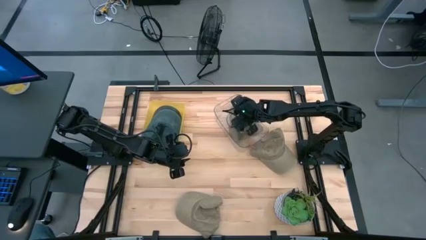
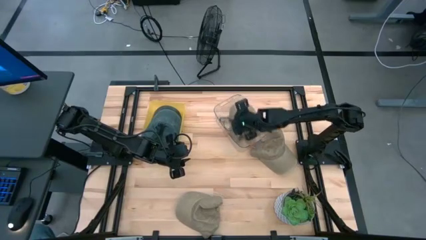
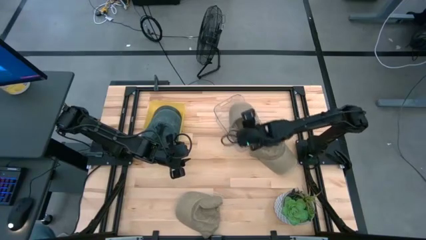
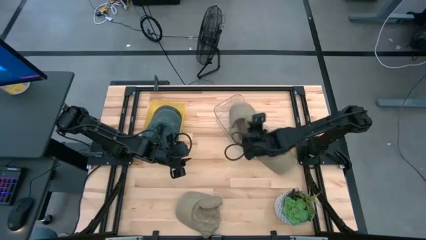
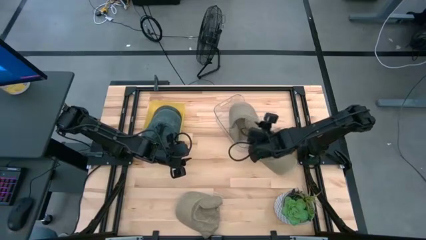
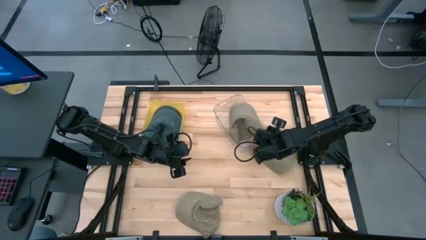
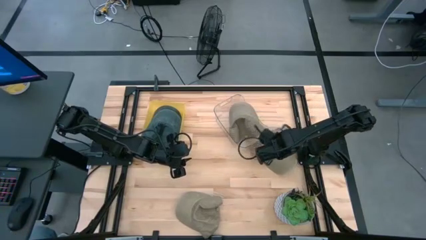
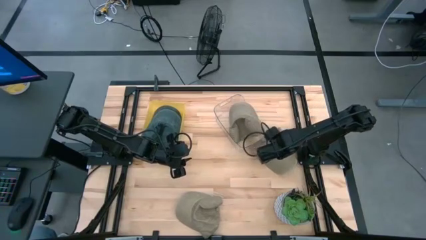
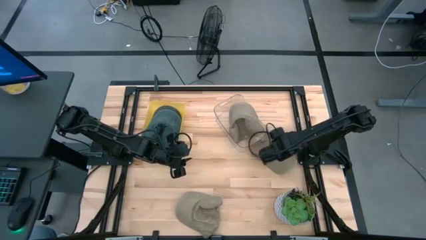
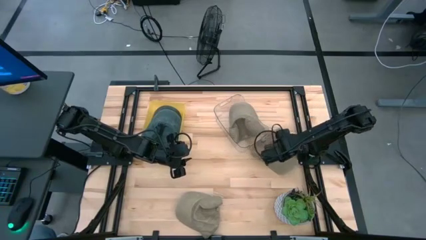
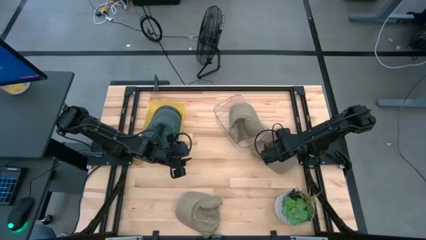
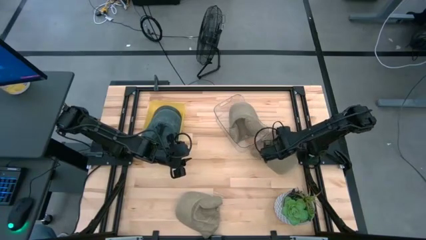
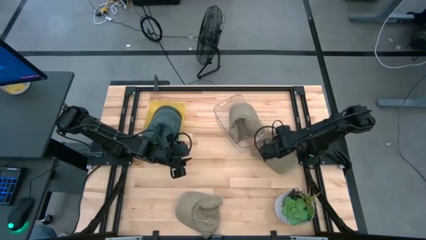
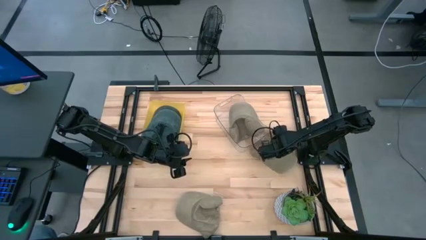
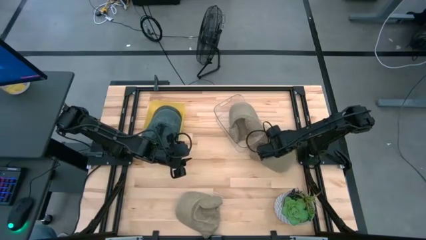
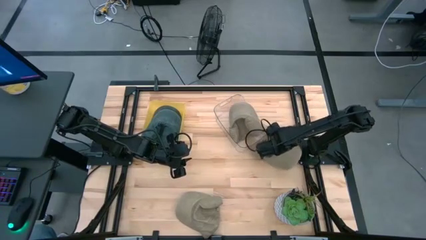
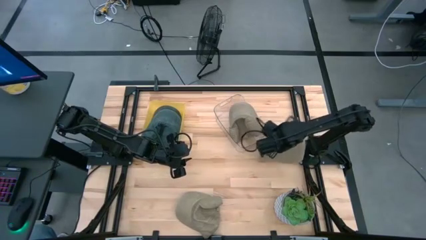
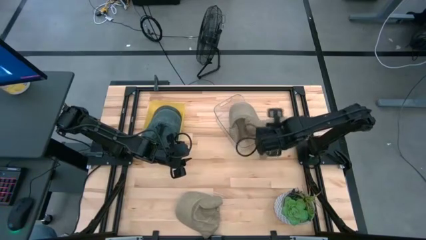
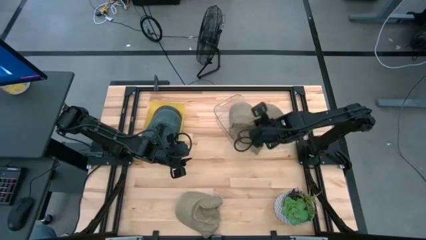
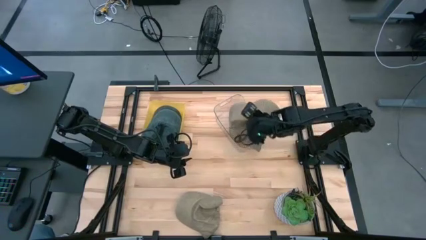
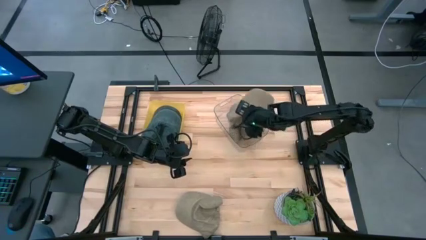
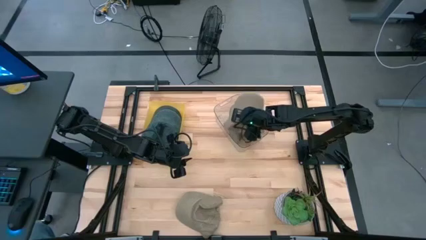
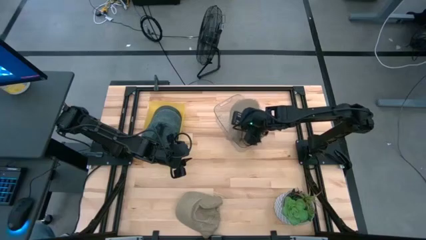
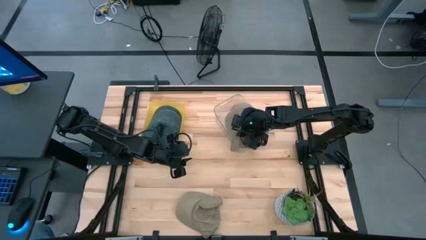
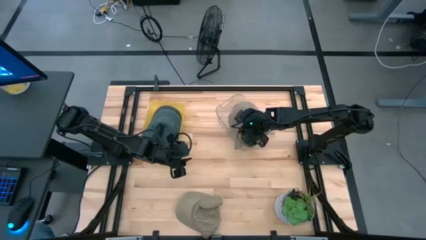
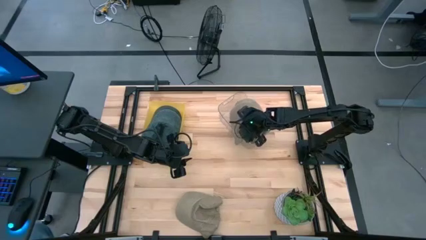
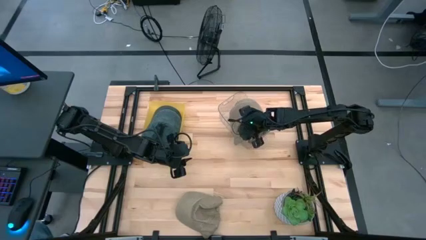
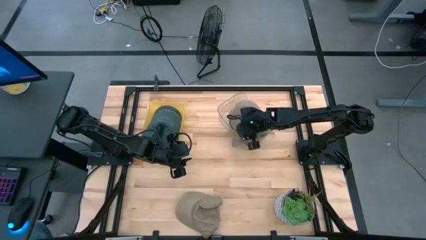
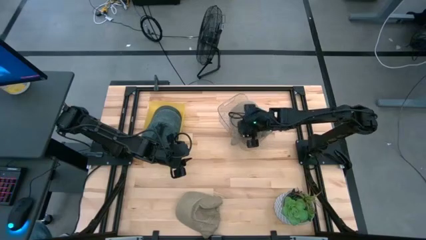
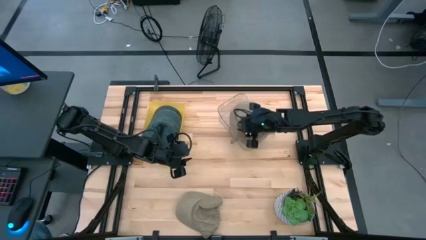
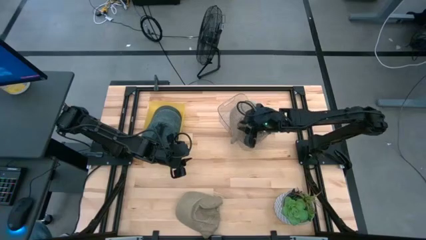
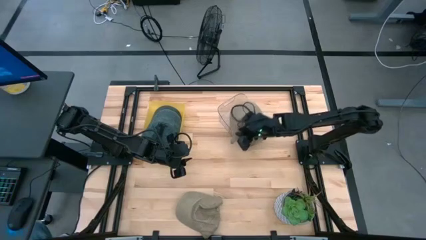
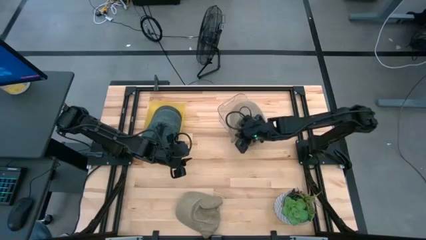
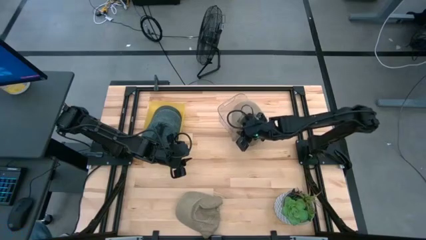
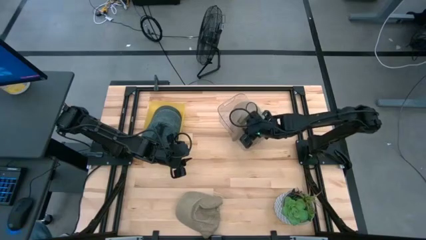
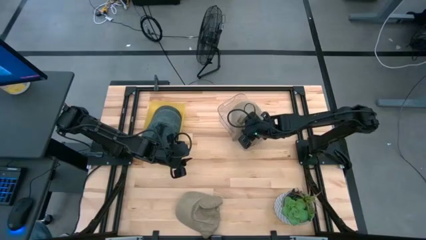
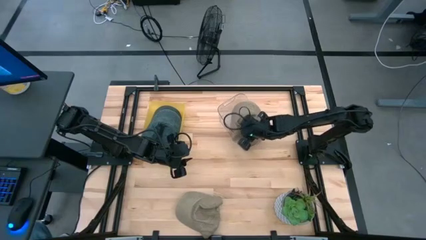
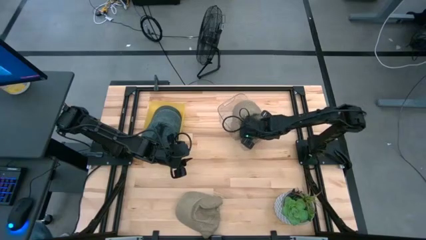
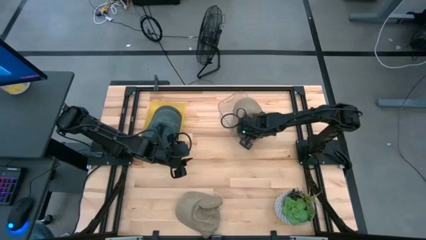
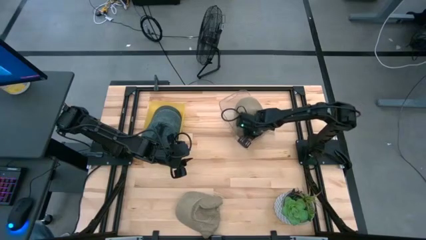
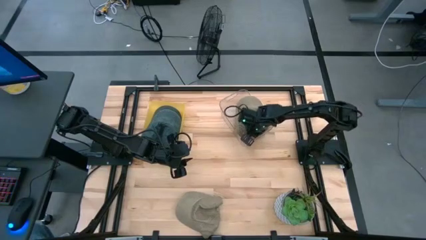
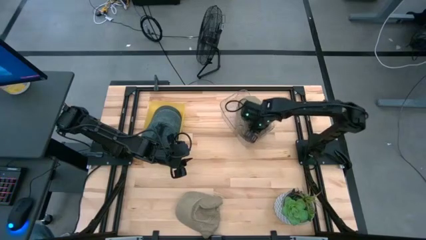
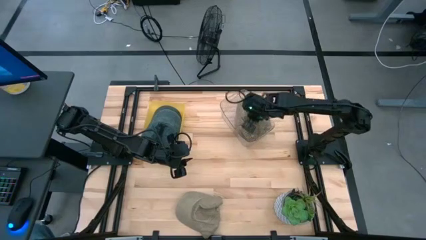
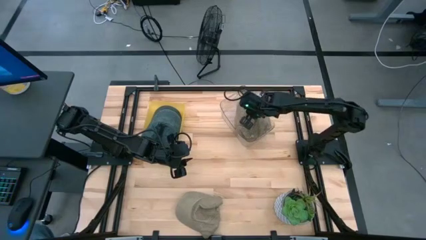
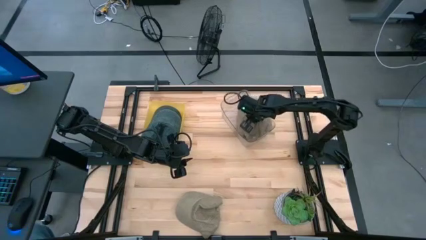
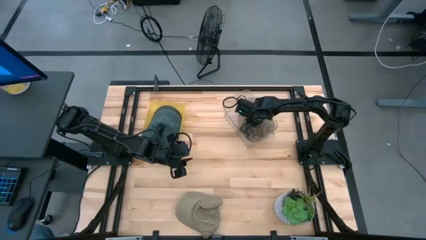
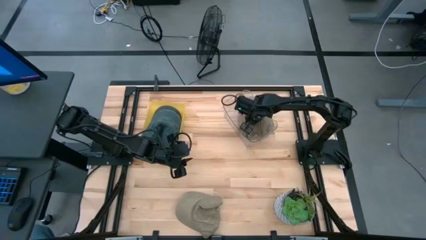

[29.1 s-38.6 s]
Task: Pick & Place hat
Put the top brown cap into the transparent bin

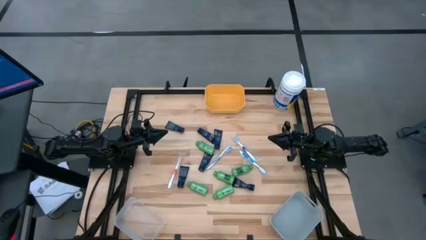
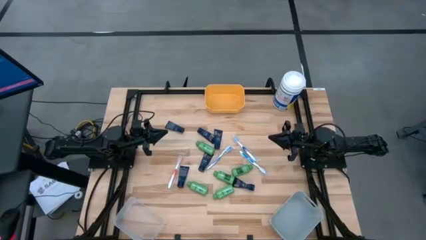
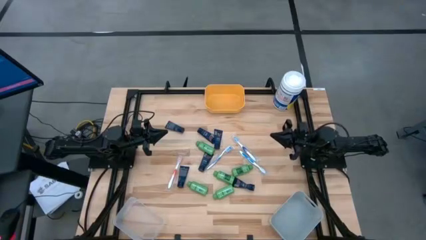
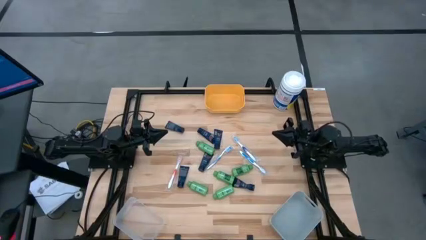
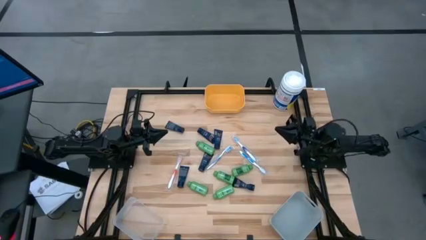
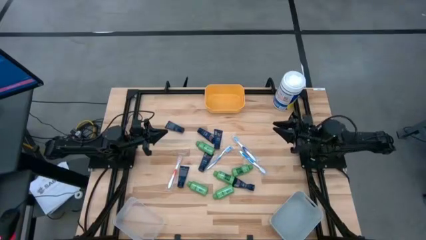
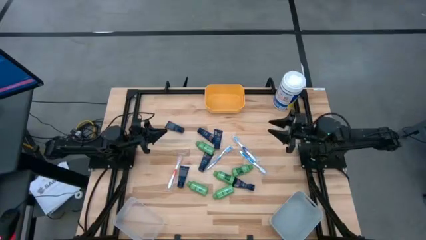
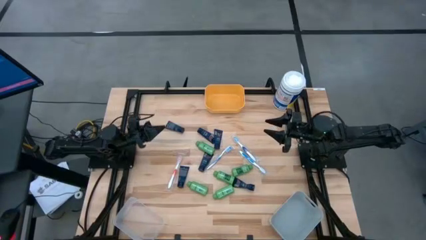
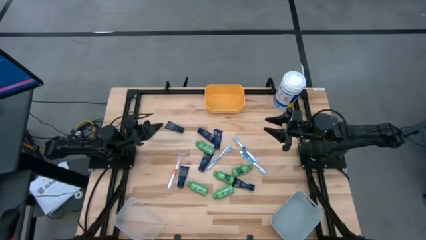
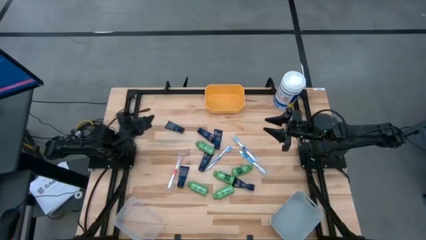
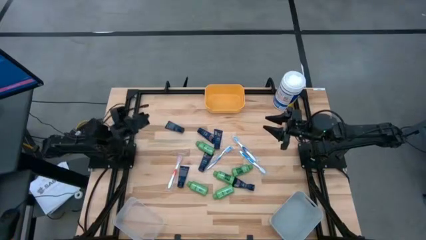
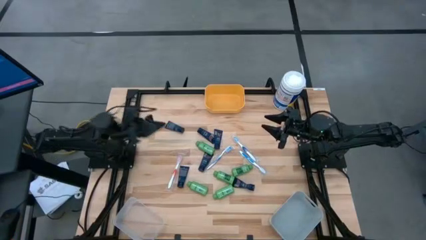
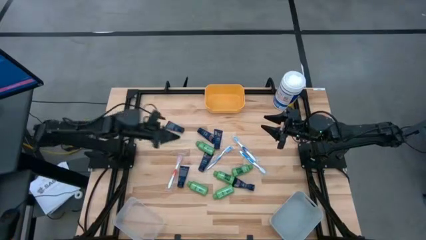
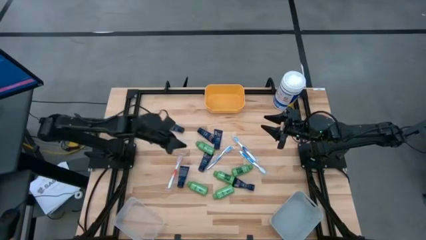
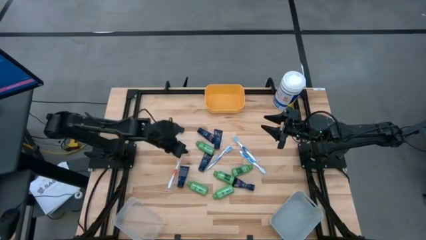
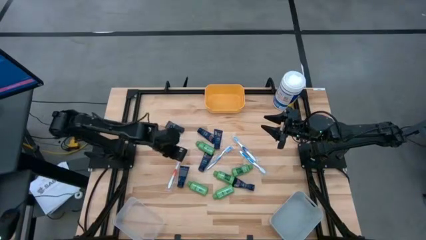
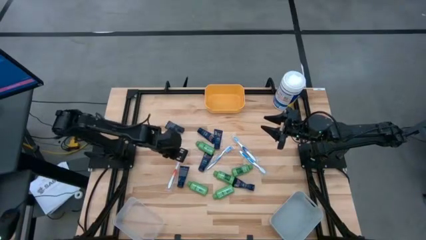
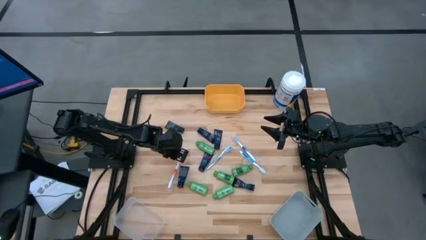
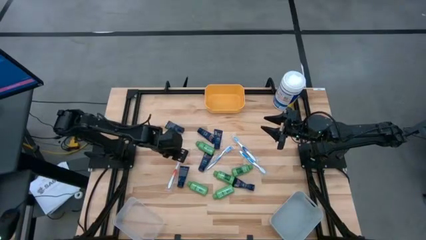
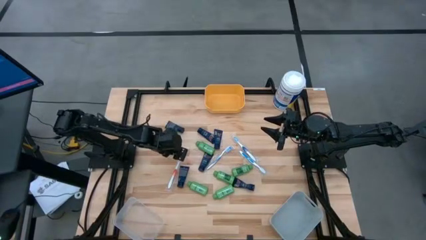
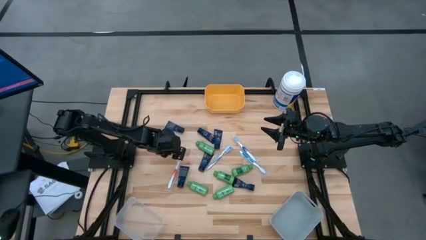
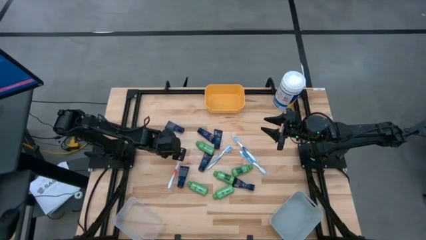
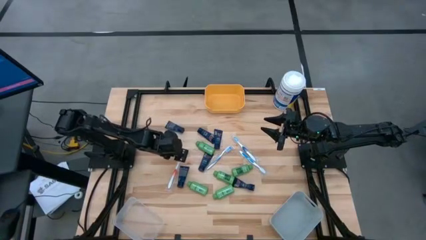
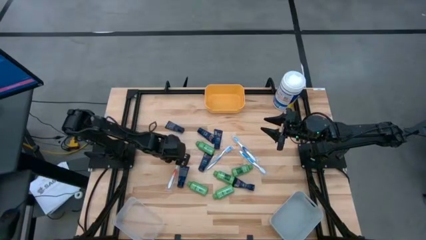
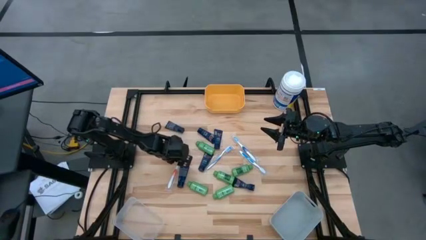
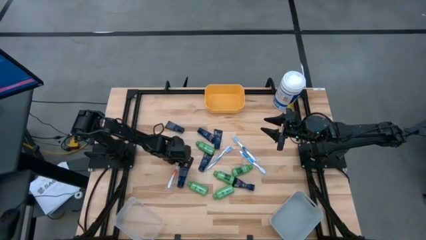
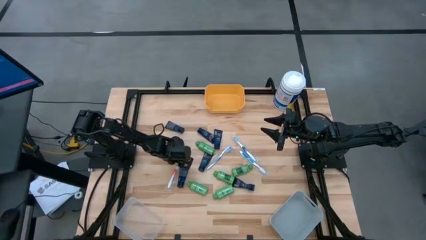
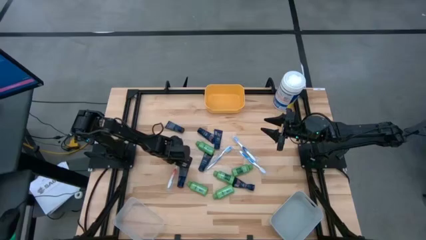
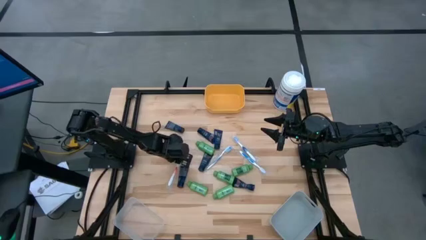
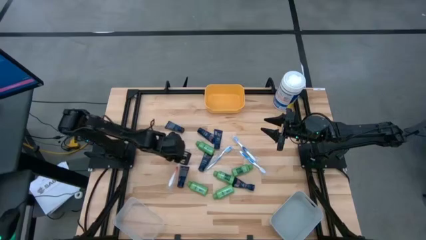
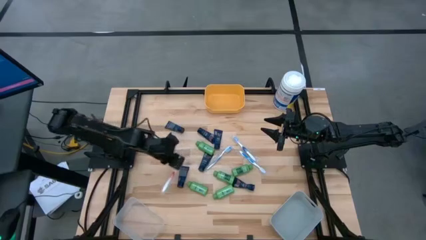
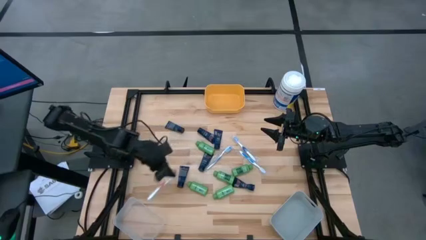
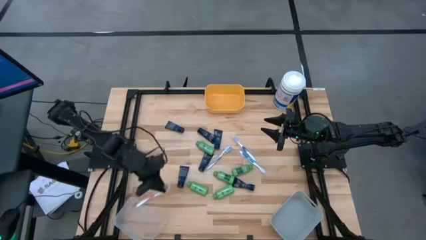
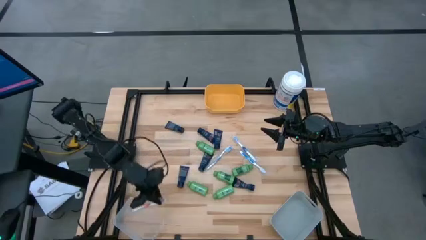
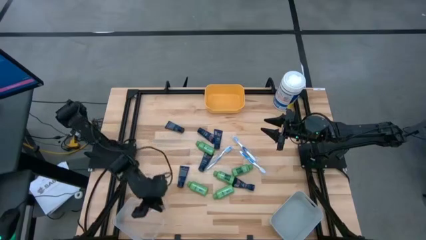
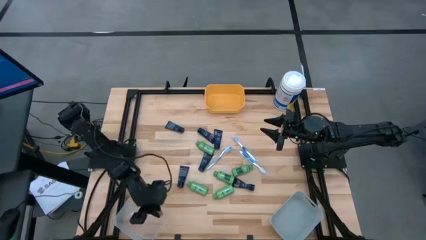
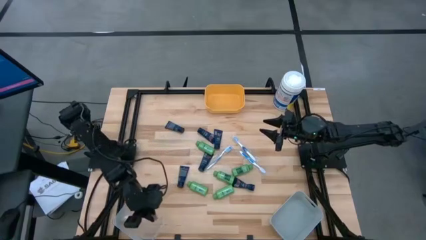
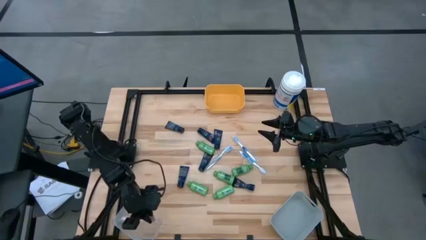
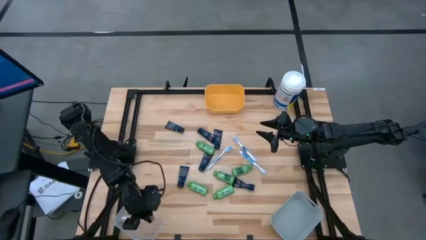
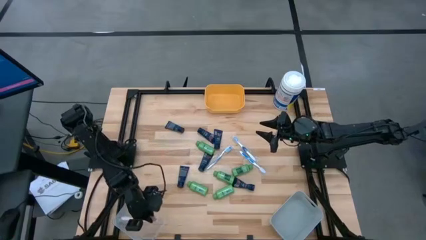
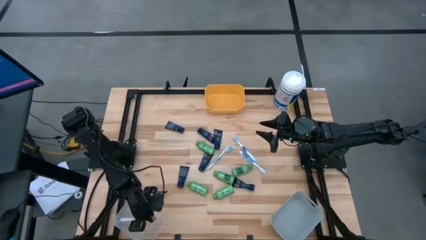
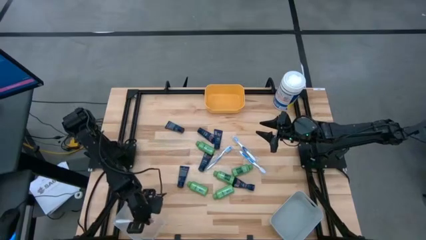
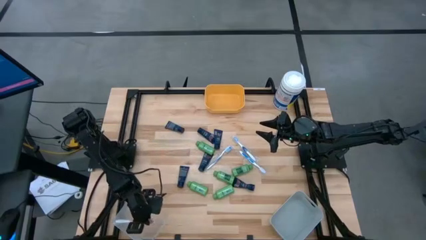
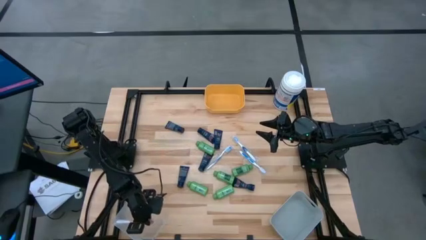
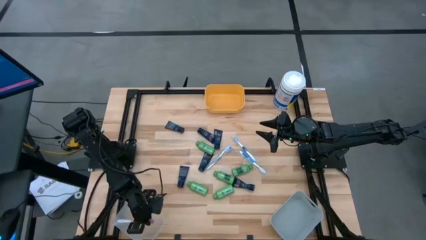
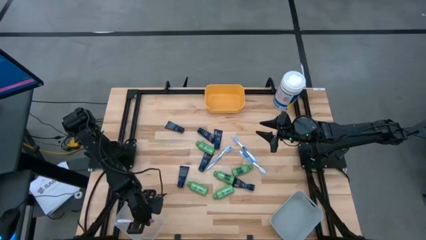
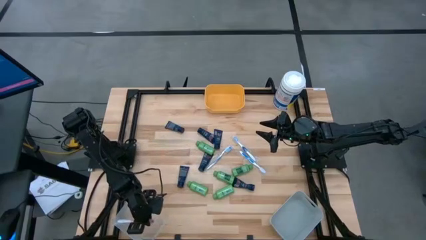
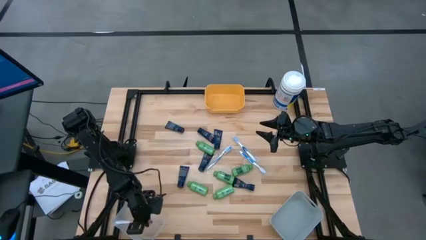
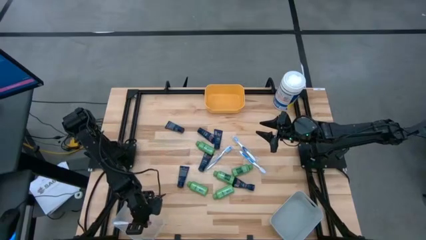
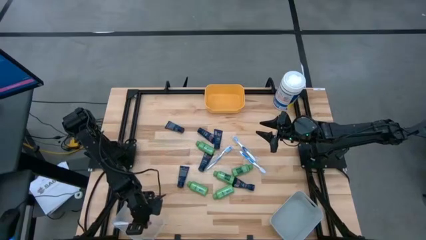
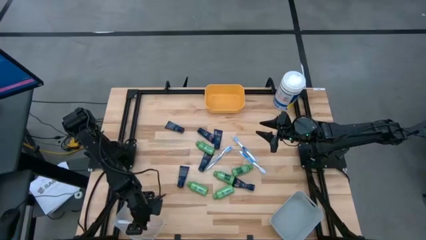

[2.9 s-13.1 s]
Task: Pick & Place Travel size toiletries
Put the red toothbrush into the transparent bin
